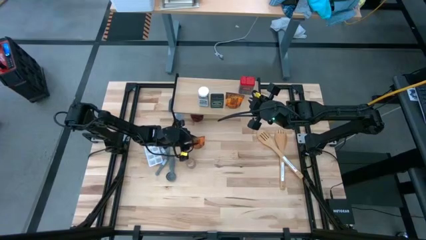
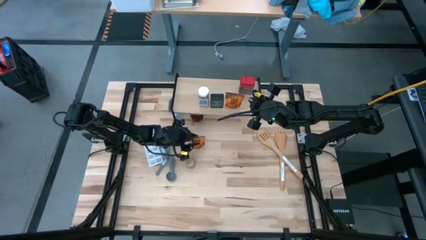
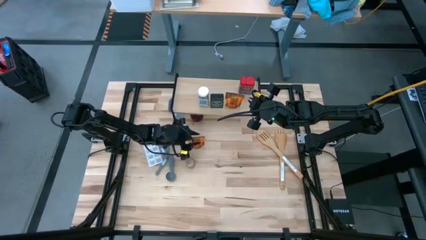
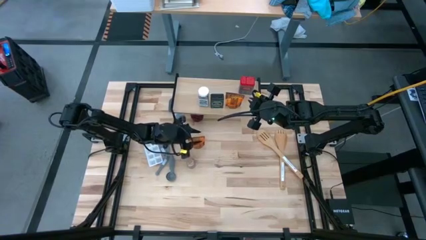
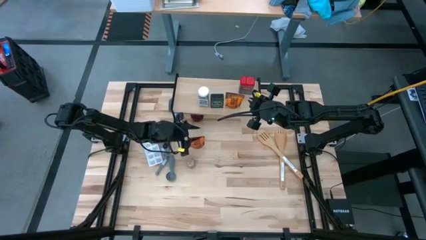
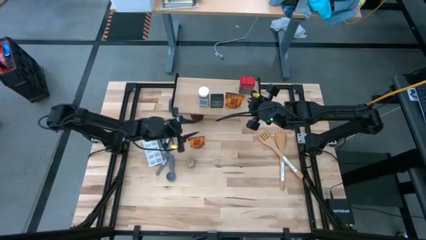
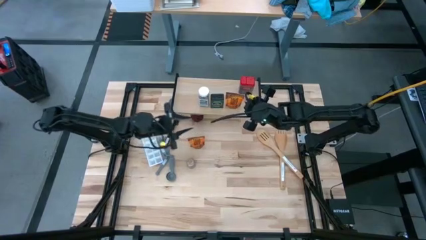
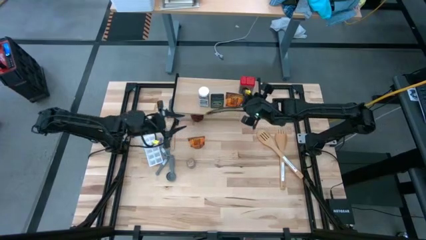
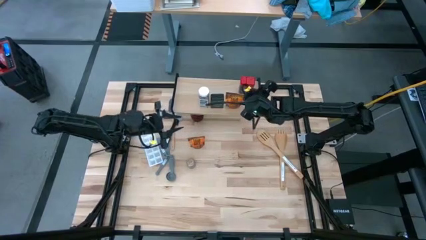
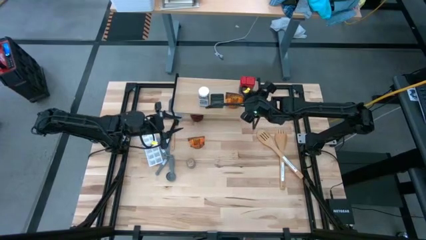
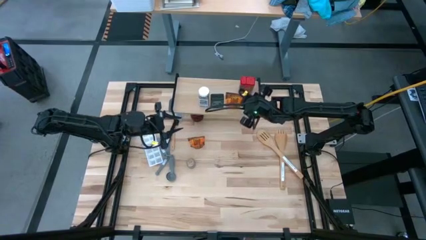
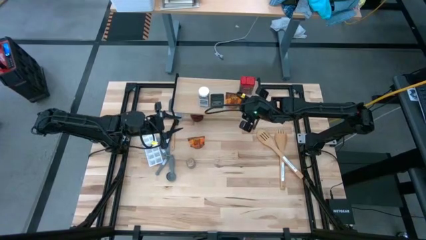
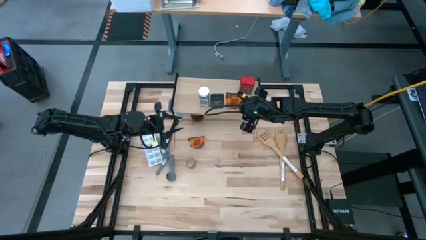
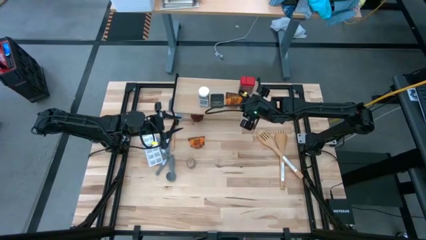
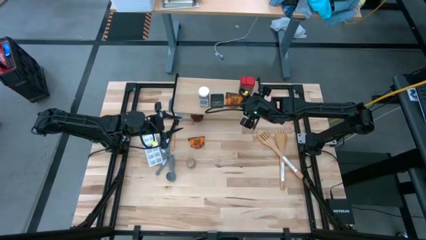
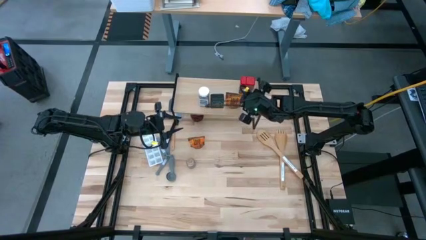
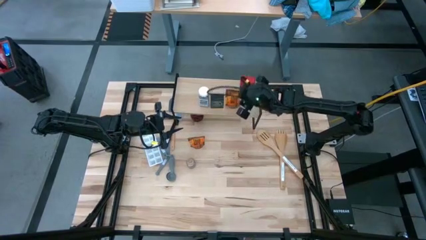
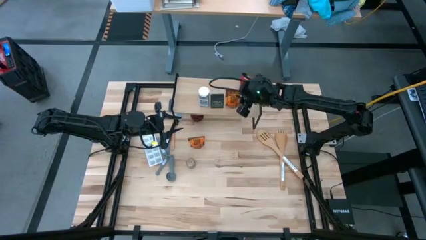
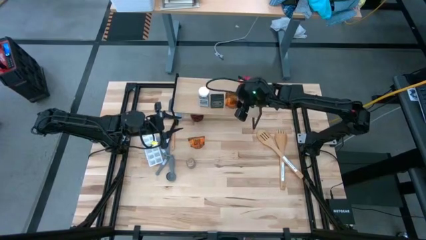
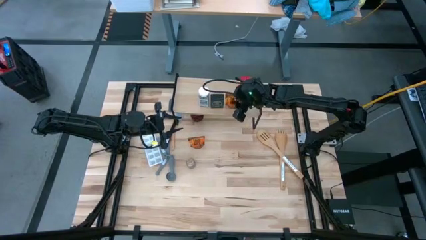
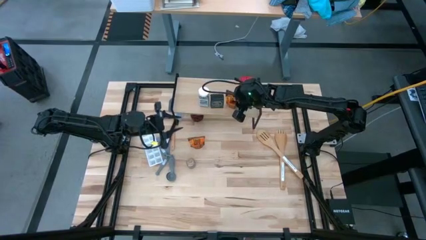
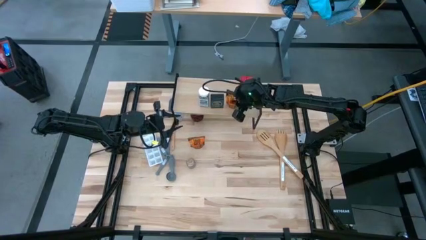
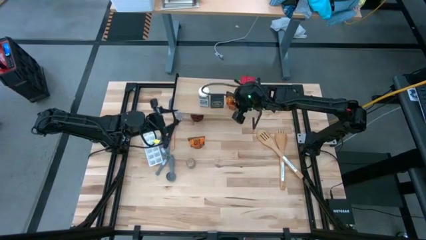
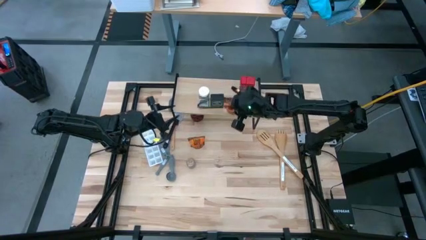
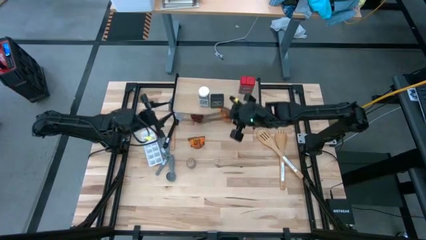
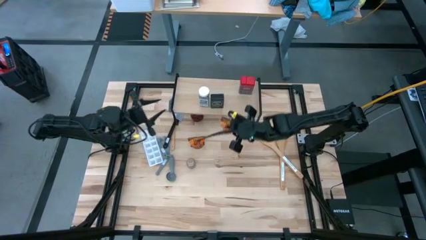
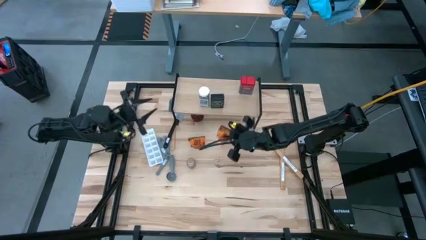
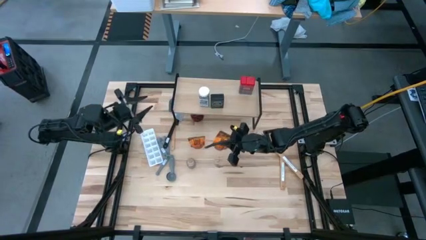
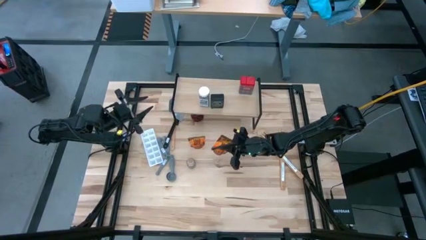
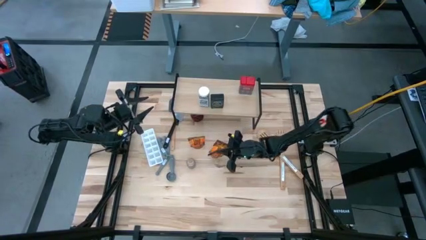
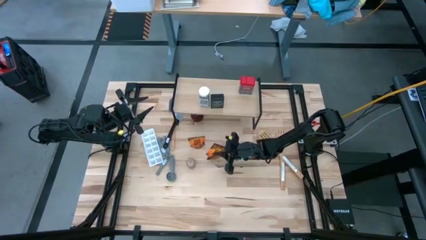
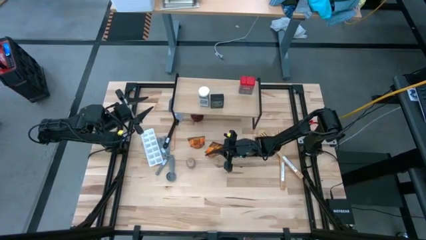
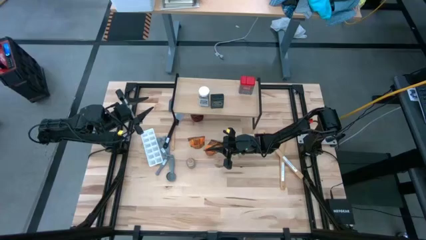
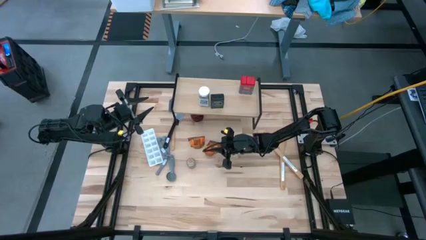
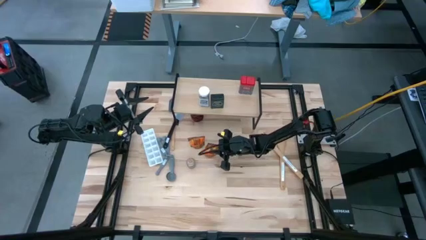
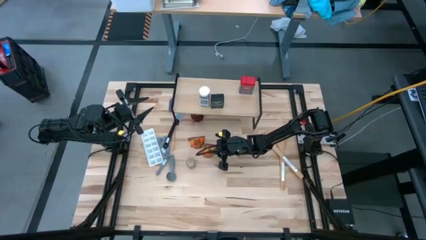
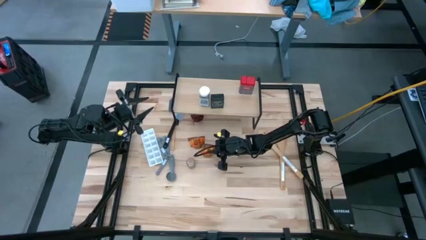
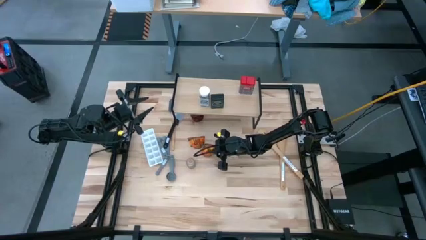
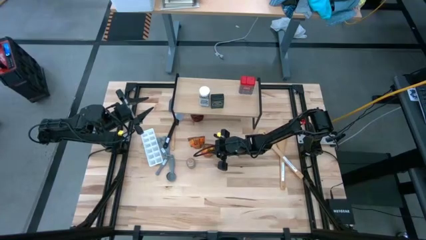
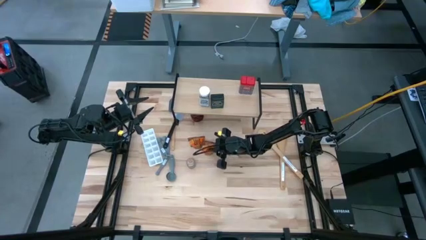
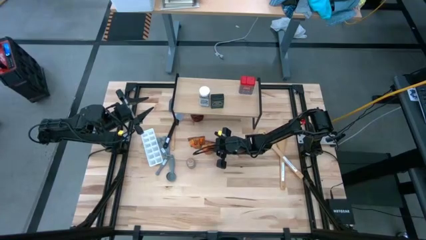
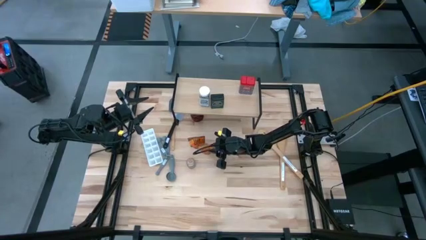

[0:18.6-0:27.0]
Task: Shelf spices
Remove the orange seasoning pack from the shelf

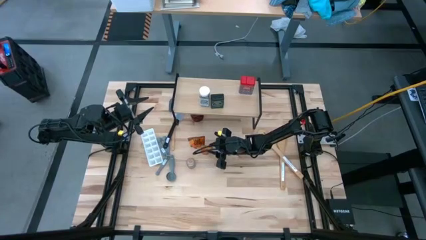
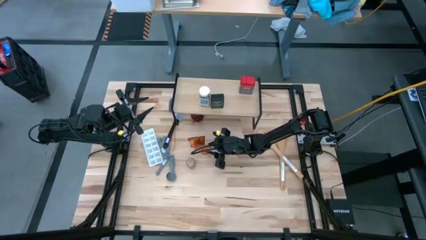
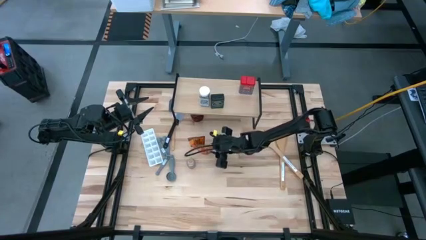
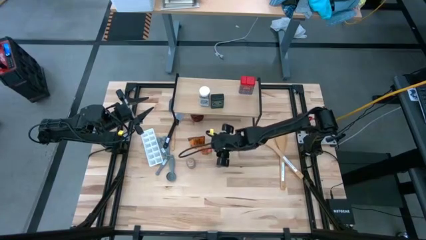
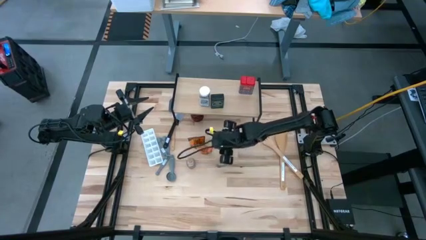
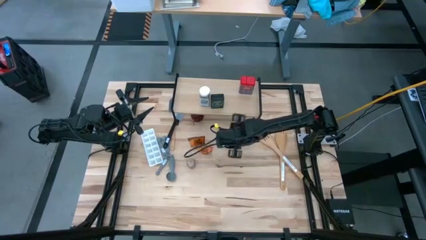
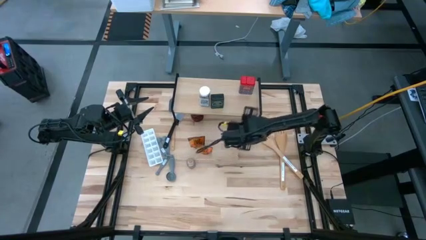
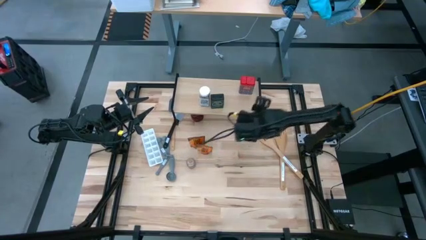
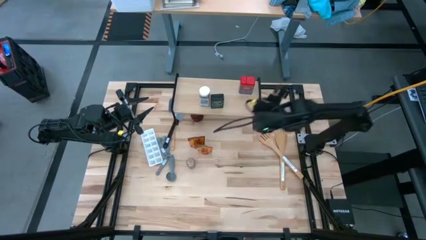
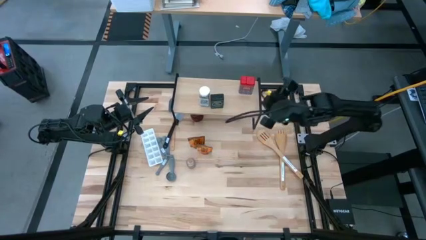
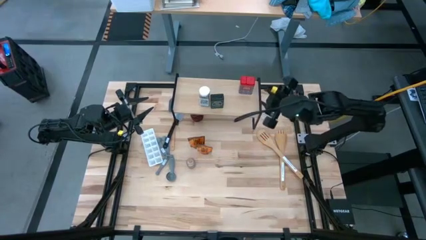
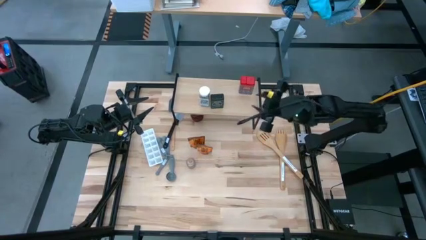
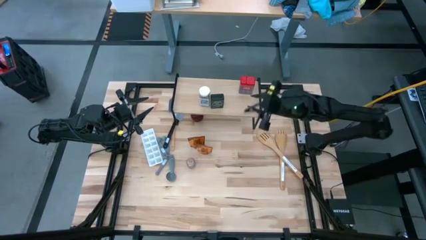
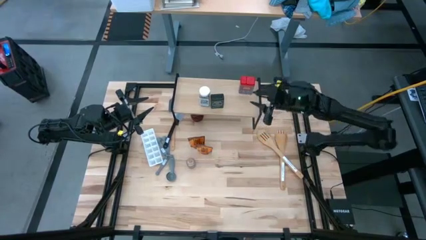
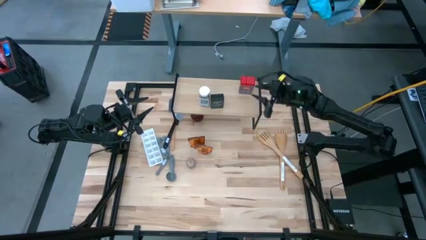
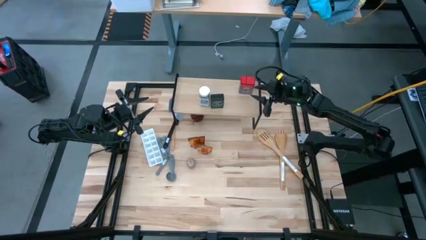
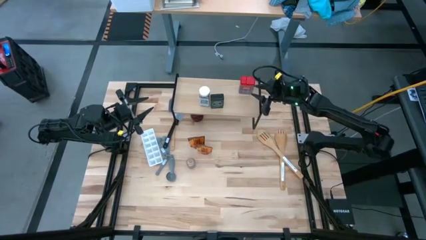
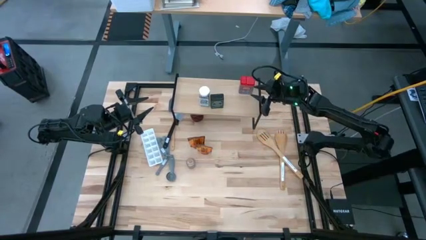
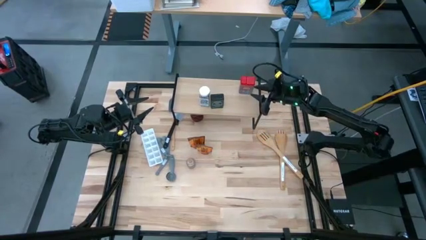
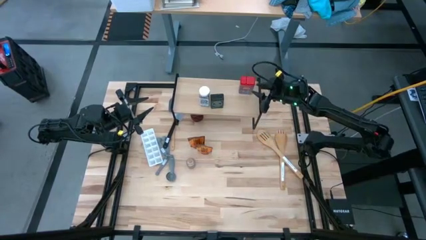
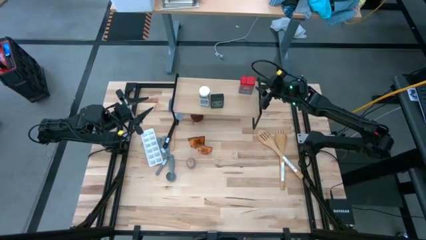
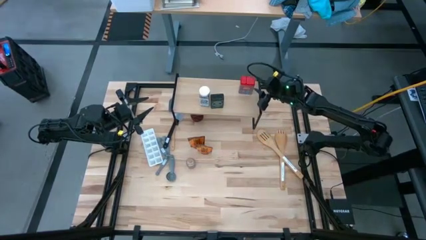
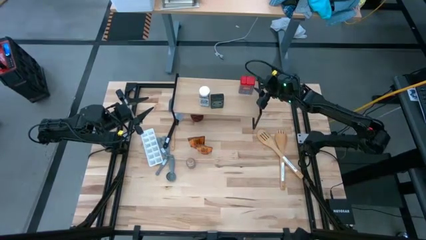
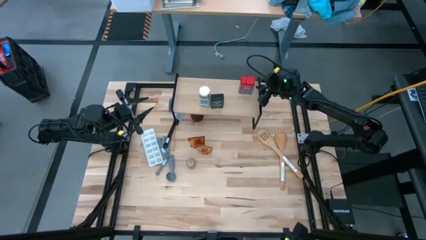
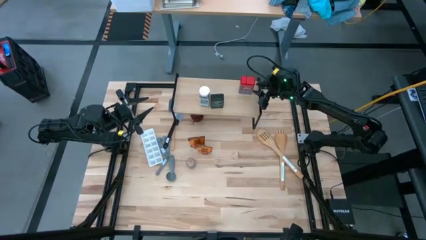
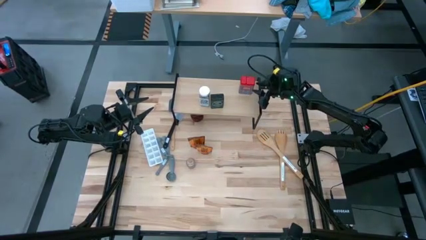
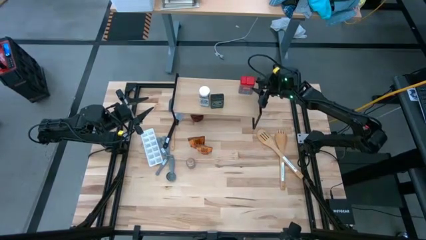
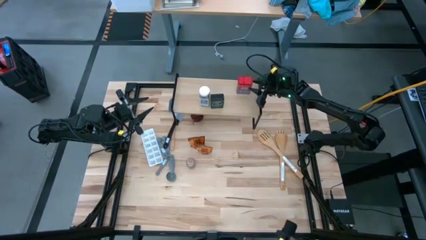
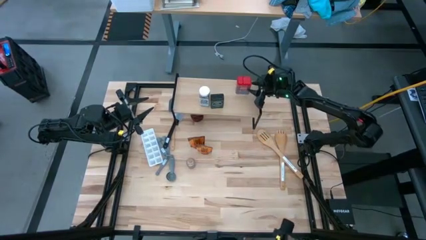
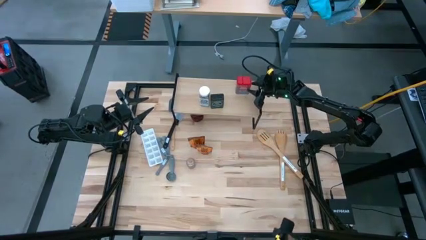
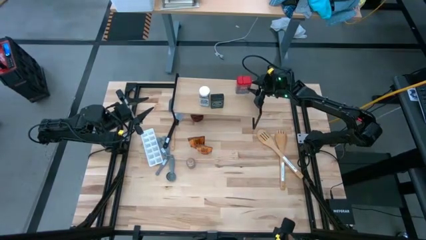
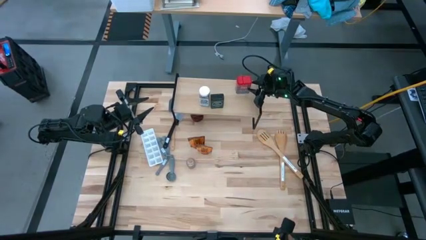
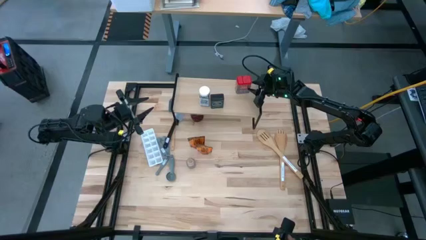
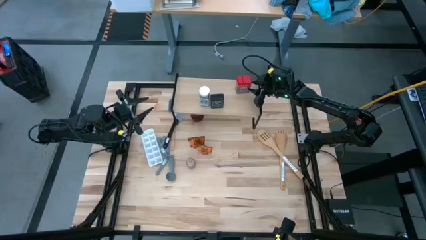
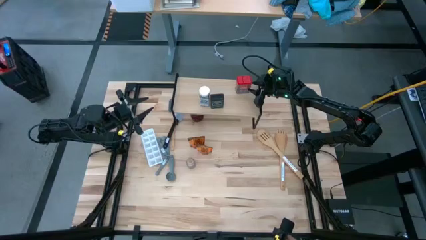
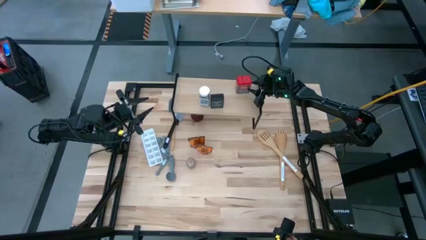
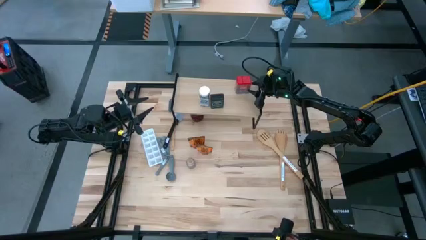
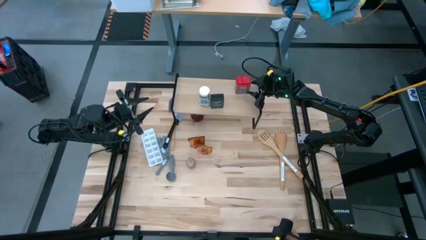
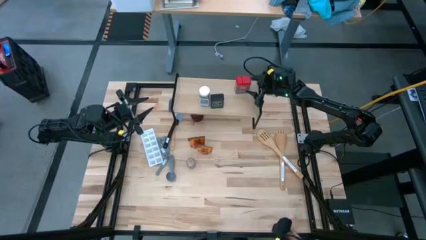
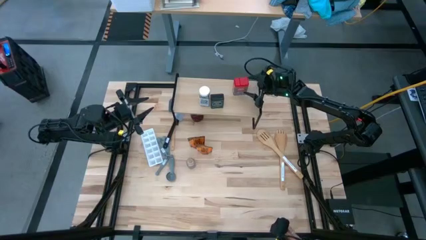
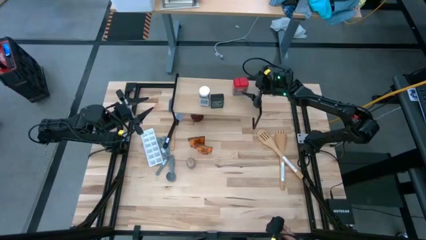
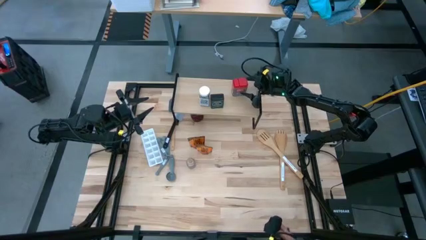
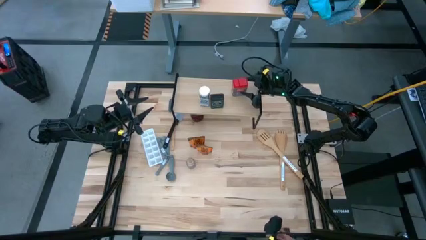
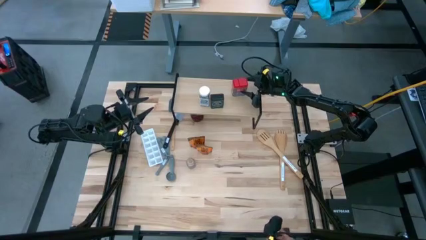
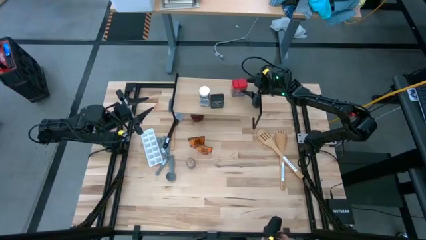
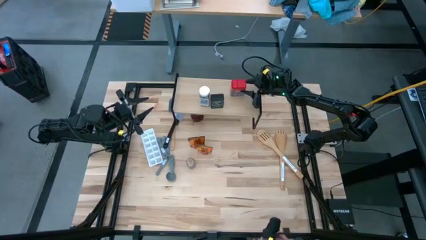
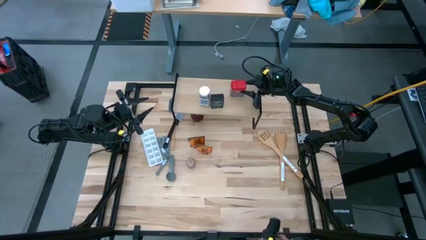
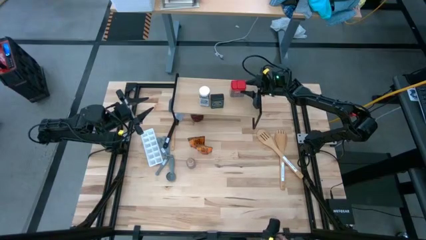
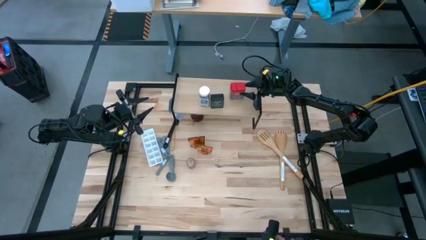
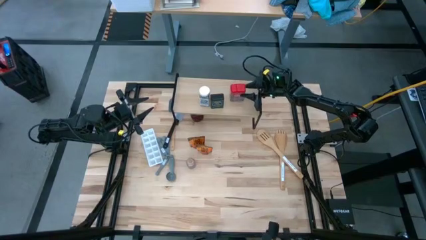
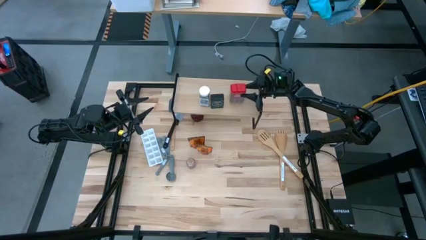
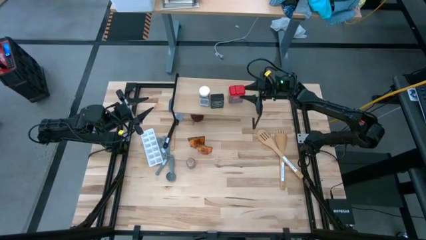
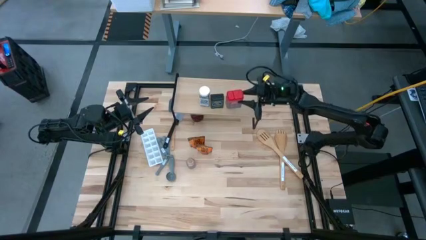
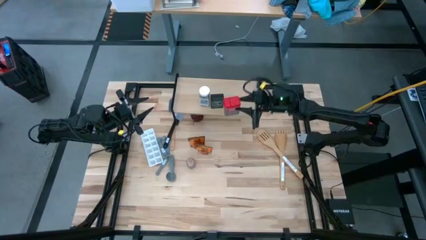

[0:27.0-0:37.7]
Remove the red seasoning can from the shelf
